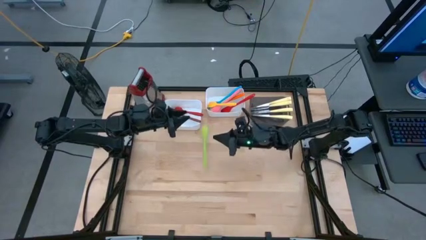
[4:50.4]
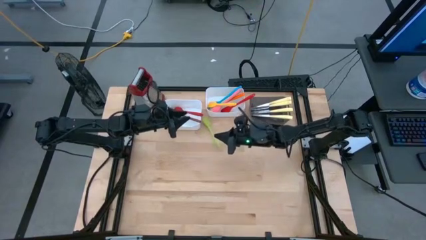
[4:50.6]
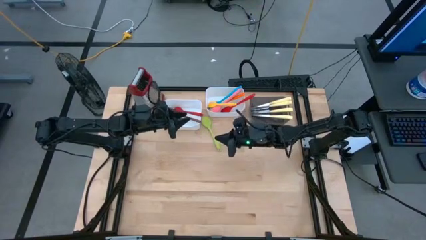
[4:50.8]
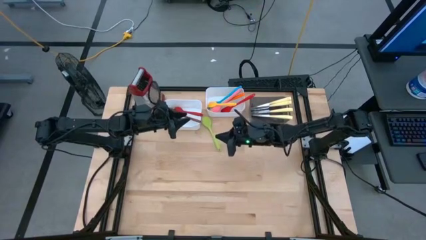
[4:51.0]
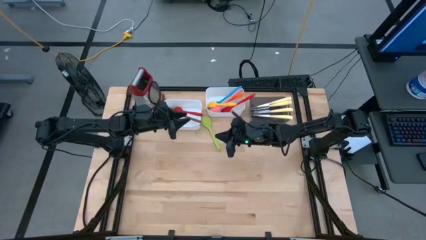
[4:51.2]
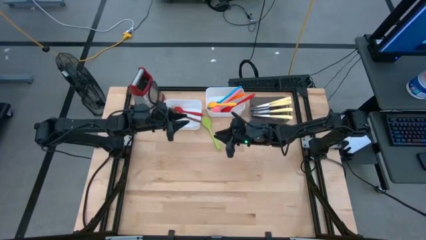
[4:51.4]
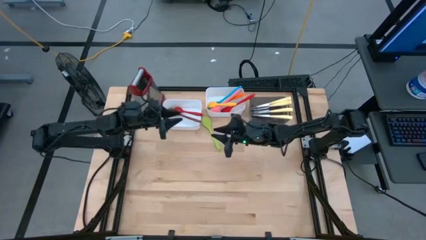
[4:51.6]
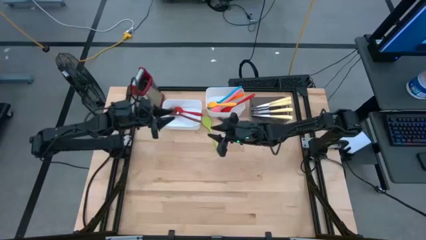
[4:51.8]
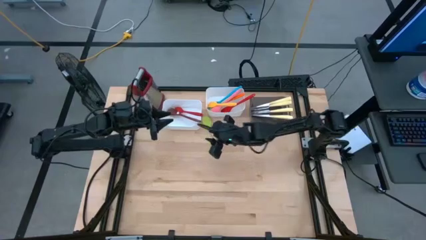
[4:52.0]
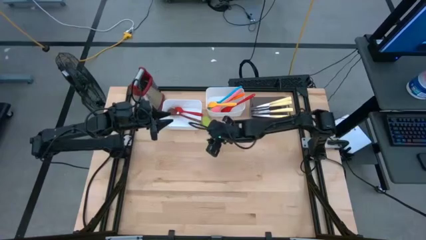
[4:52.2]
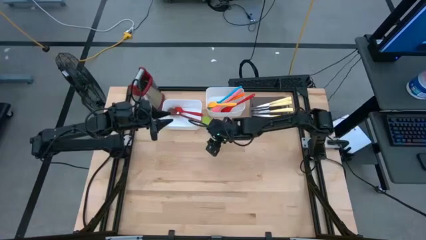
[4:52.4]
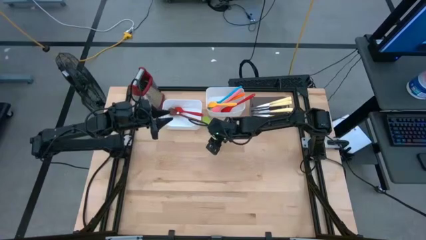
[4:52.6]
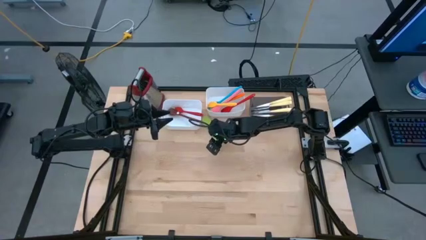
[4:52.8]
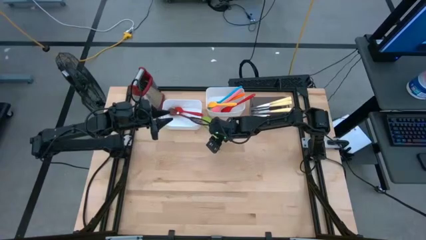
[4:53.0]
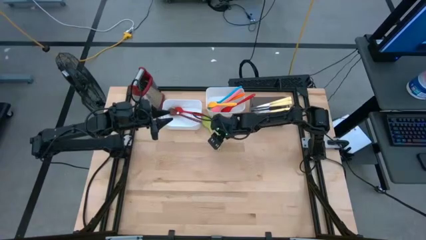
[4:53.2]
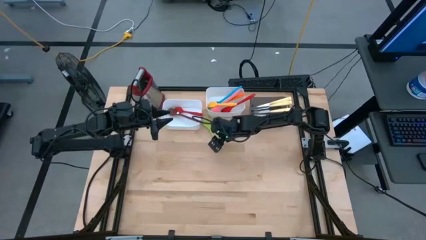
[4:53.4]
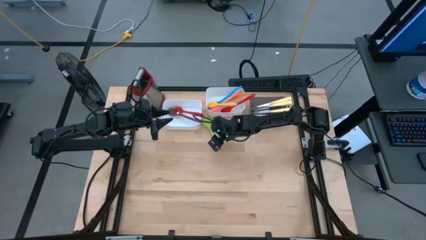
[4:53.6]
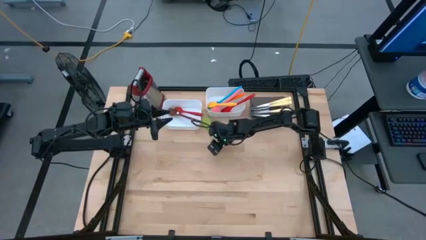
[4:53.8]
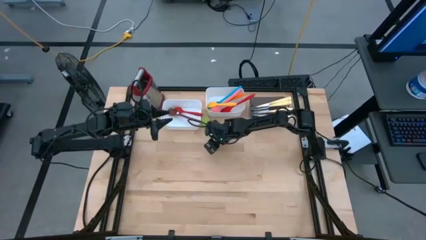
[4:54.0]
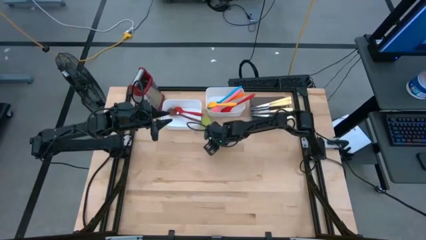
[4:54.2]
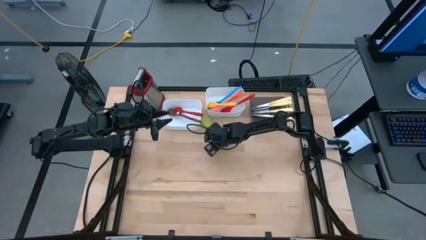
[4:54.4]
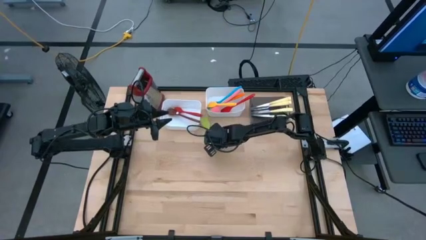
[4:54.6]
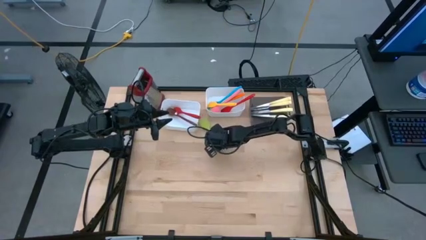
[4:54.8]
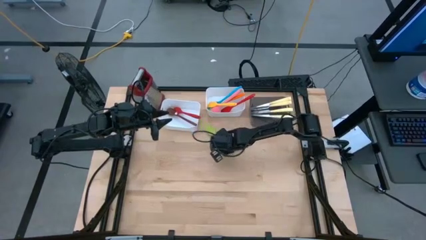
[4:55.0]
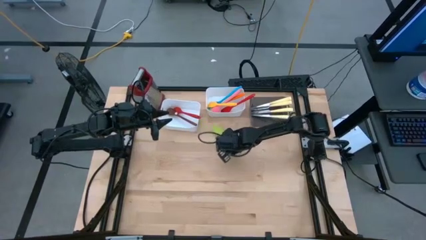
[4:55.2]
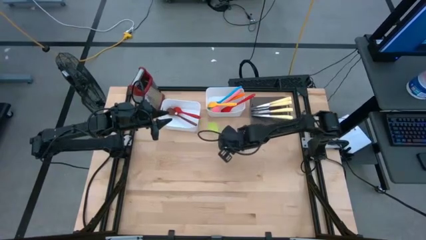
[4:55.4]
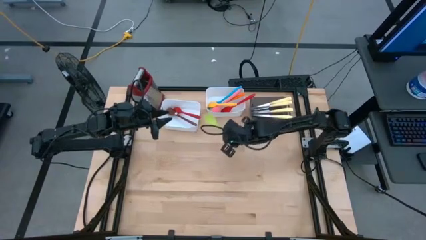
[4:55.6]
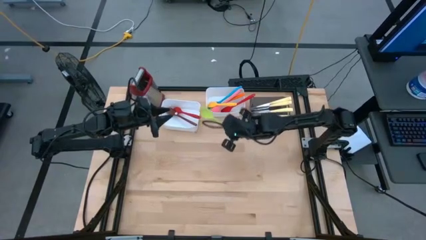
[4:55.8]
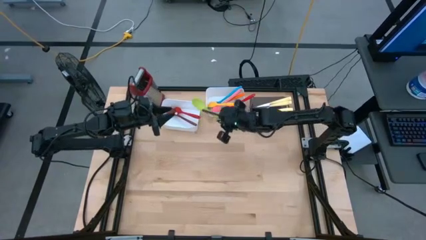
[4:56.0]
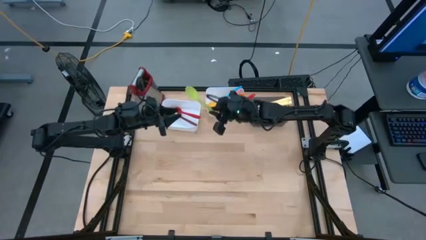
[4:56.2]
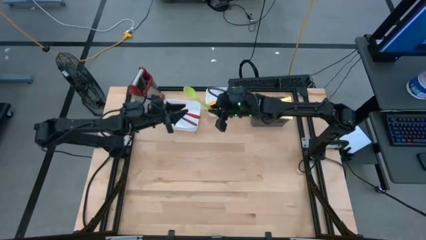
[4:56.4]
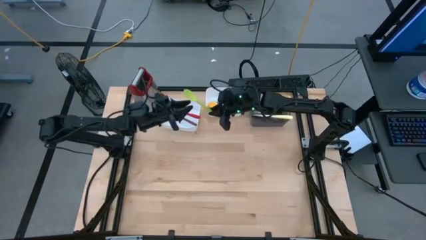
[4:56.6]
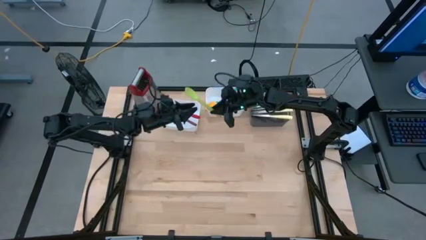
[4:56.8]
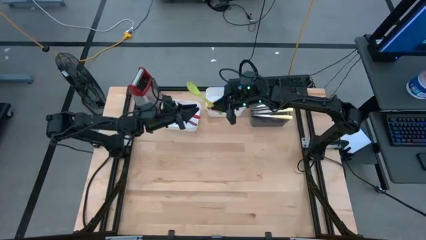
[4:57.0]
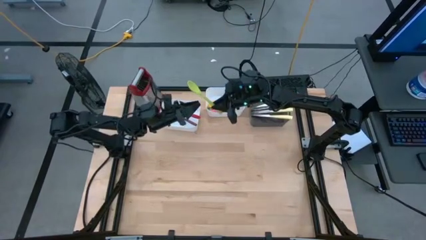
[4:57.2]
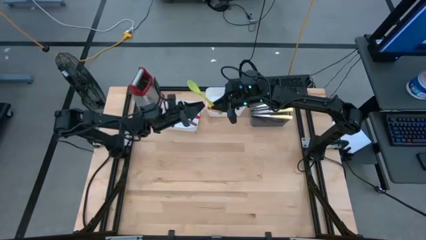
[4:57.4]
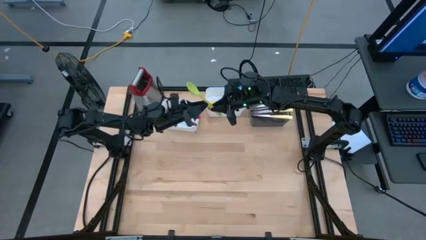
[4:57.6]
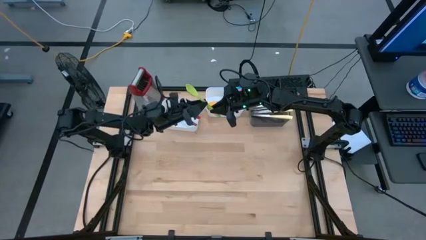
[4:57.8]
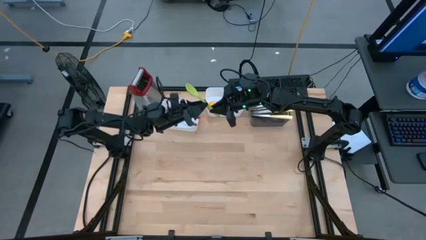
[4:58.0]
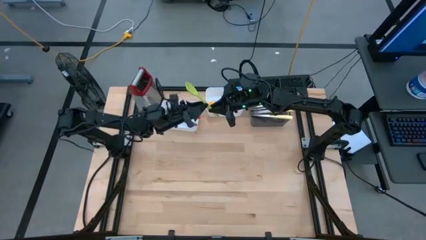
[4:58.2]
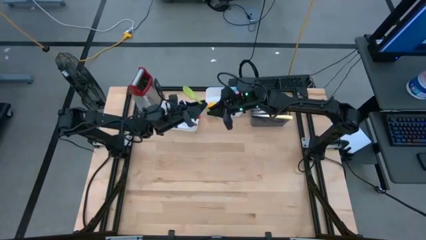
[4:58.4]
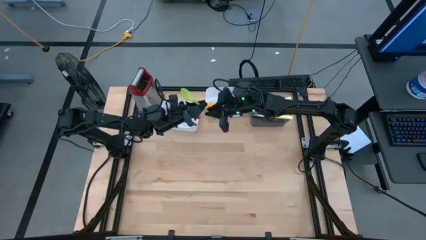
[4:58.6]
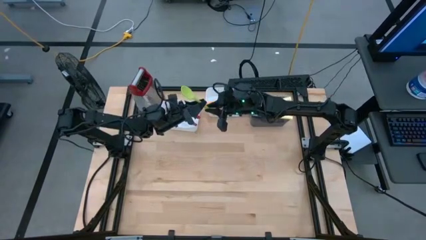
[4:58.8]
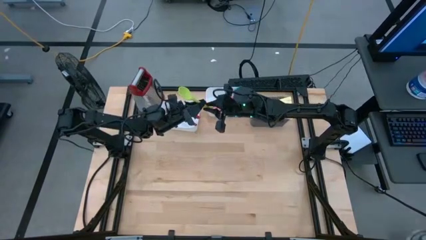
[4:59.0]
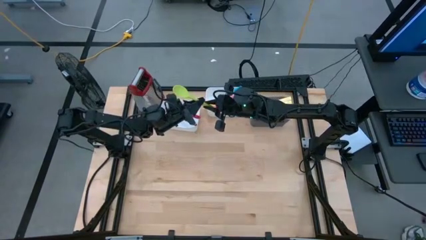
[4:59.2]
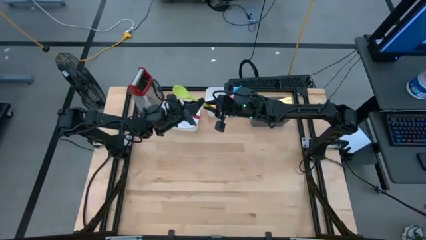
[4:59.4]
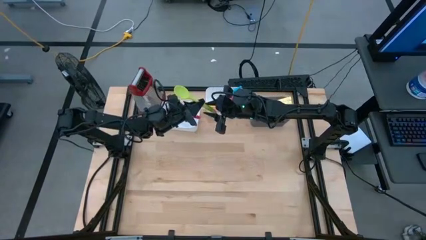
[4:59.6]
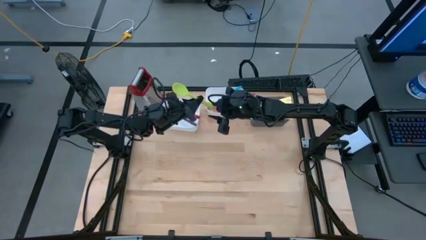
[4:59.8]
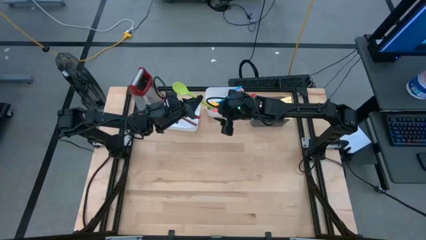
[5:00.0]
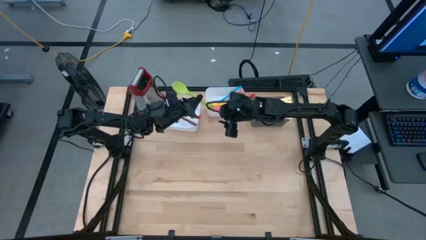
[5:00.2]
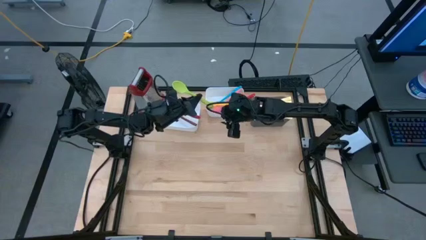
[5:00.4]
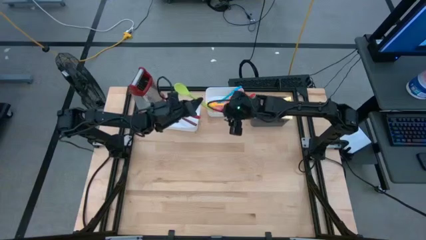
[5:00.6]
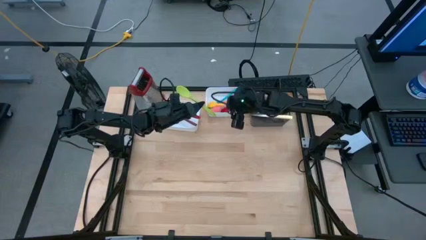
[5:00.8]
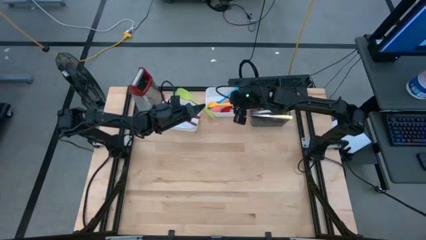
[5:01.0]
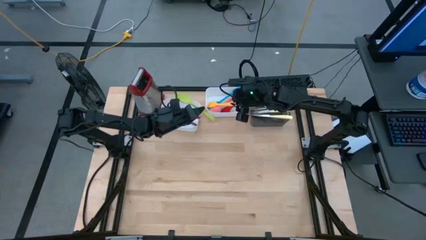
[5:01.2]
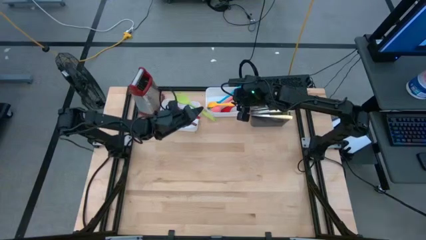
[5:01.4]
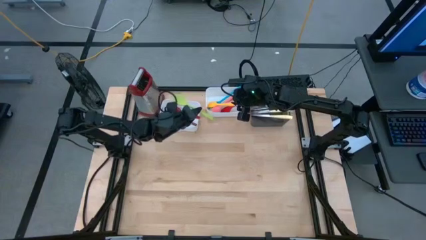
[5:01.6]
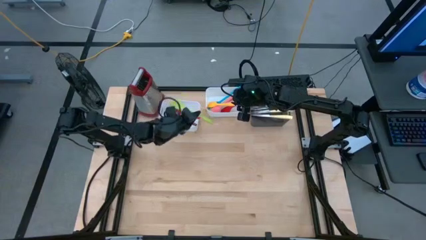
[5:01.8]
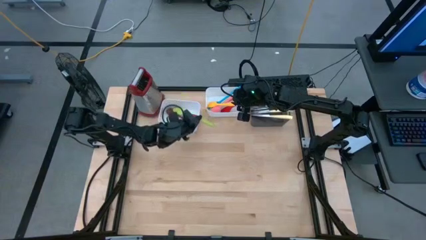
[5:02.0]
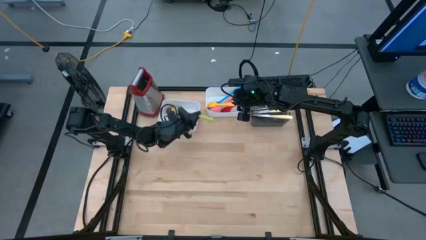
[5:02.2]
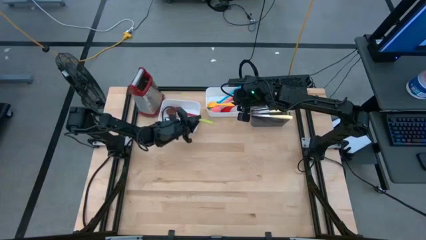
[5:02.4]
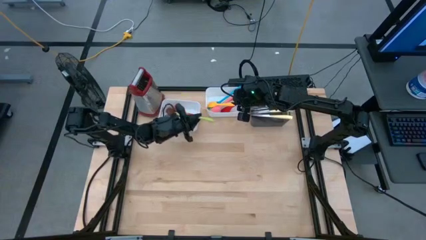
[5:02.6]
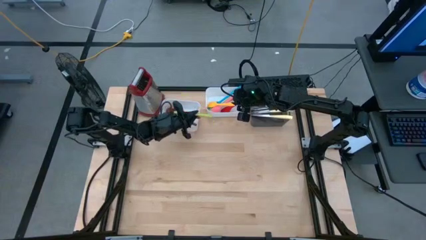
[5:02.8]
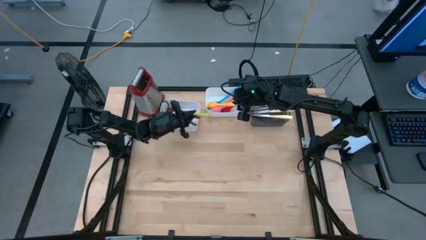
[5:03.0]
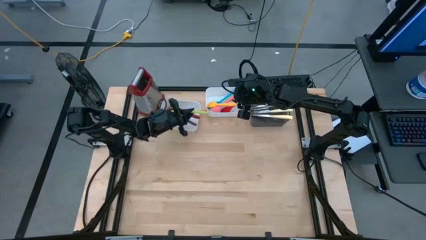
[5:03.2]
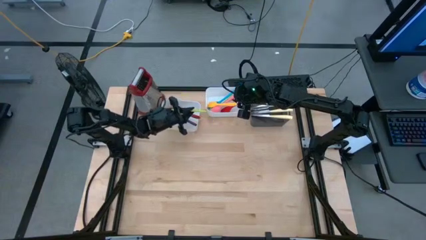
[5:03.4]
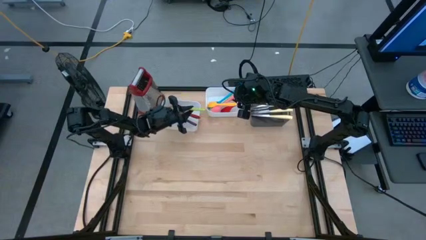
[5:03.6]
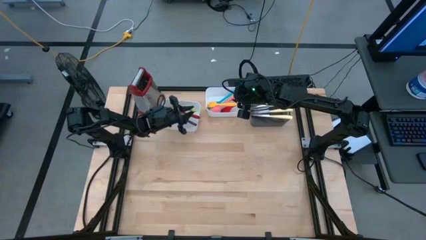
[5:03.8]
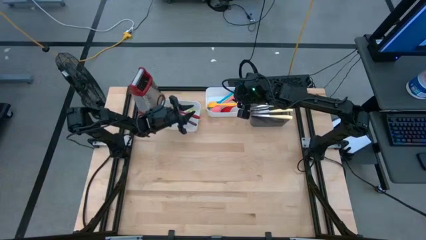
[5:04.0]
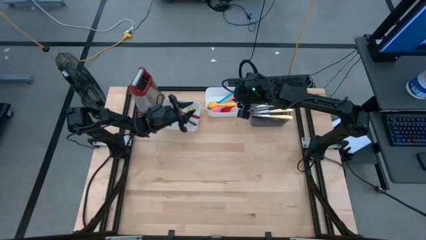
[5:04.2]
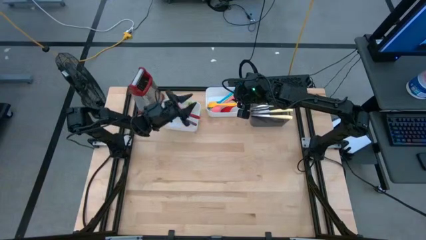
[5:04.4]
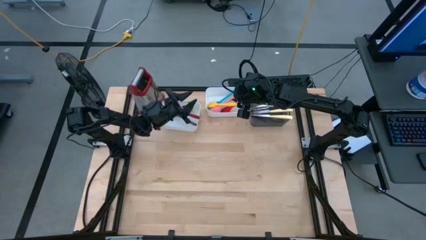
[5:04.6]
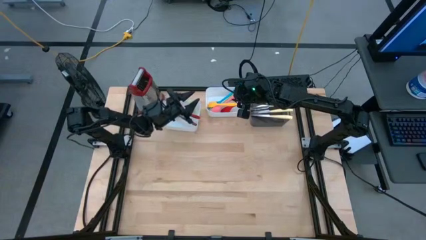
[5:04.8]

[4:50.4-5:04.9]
Task: Pick & Place Kitchen Items
Put the green serving spoon into the left white bin
